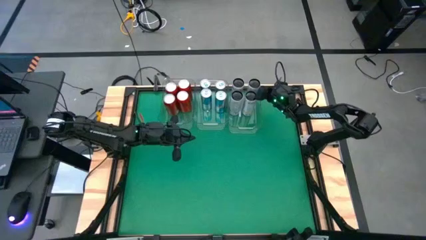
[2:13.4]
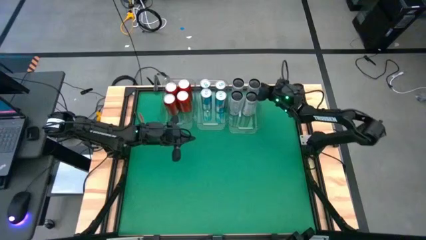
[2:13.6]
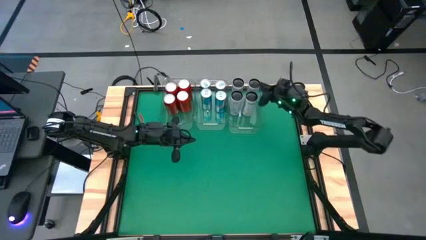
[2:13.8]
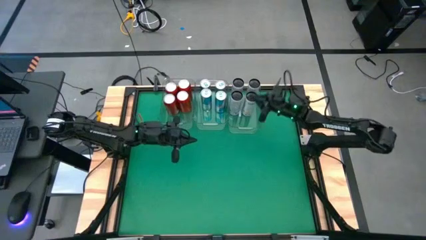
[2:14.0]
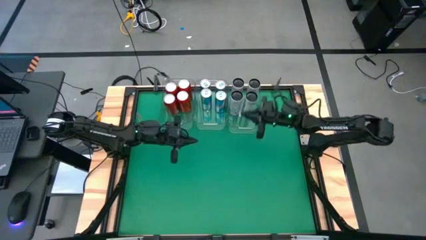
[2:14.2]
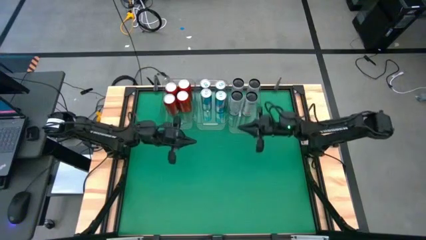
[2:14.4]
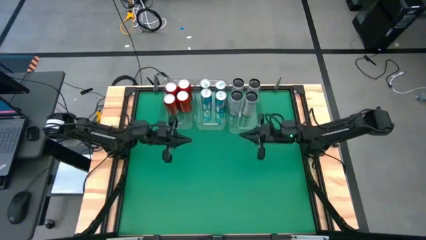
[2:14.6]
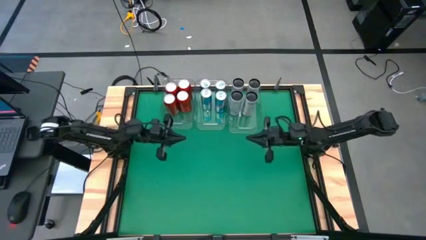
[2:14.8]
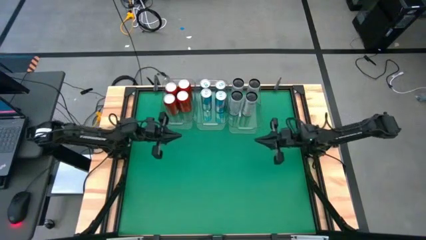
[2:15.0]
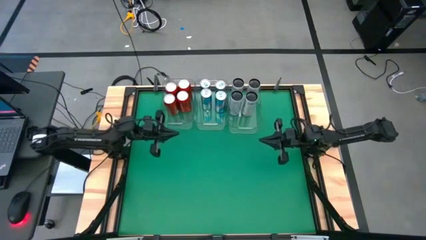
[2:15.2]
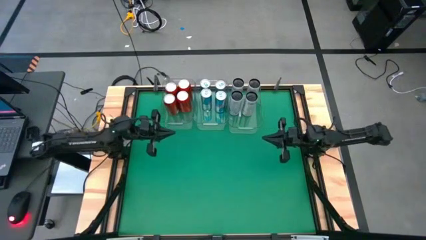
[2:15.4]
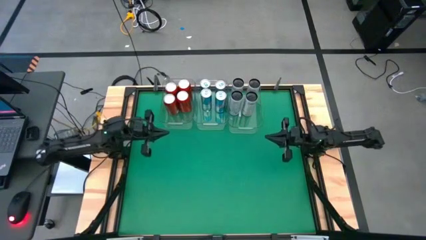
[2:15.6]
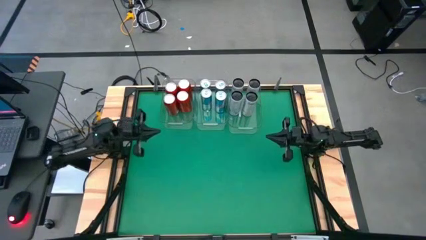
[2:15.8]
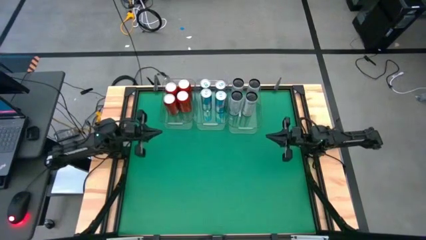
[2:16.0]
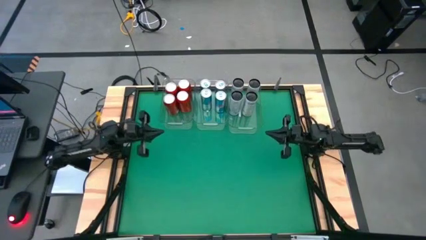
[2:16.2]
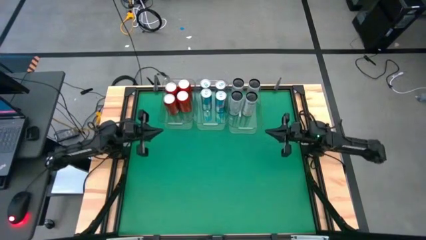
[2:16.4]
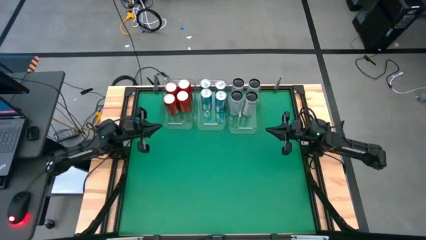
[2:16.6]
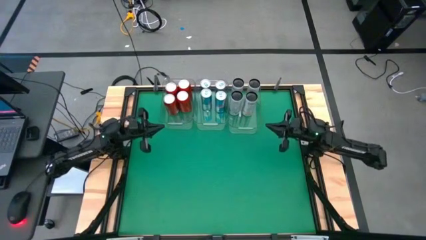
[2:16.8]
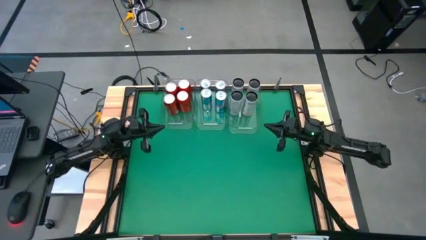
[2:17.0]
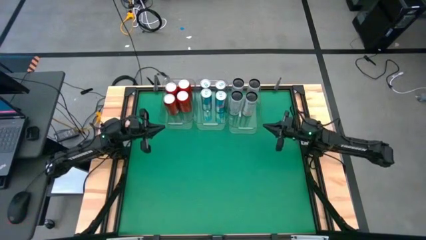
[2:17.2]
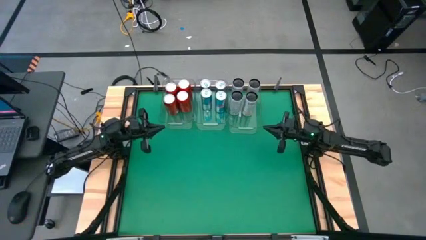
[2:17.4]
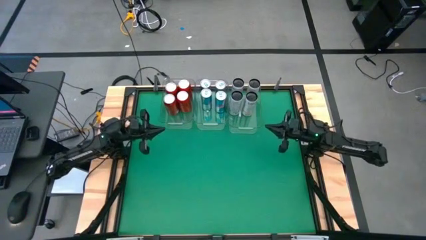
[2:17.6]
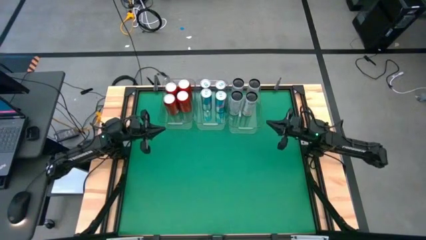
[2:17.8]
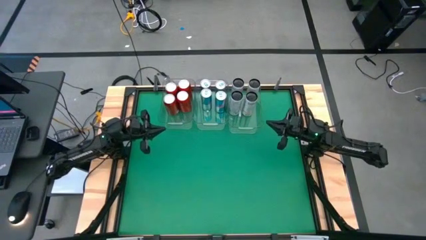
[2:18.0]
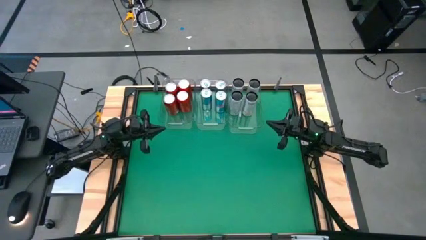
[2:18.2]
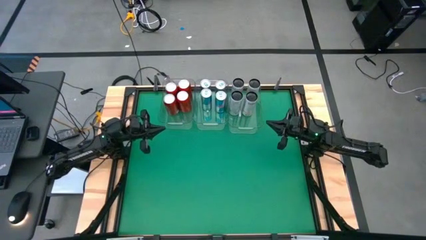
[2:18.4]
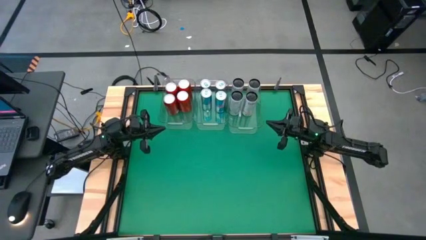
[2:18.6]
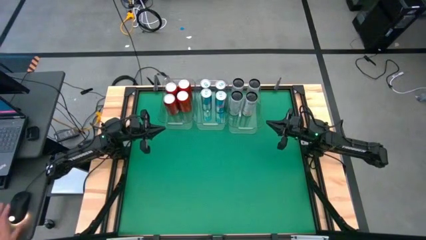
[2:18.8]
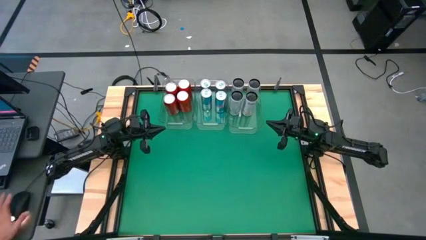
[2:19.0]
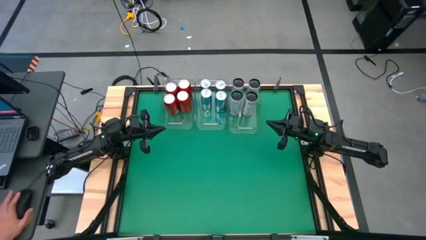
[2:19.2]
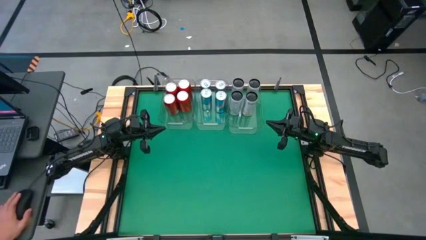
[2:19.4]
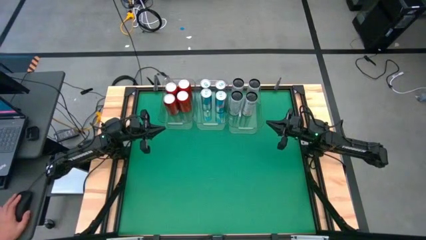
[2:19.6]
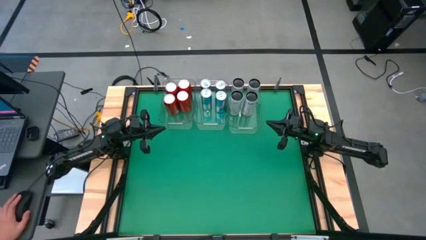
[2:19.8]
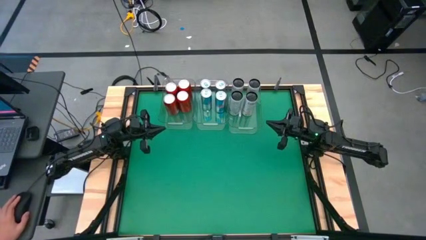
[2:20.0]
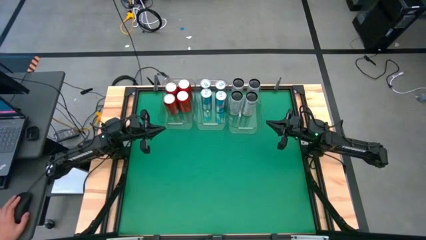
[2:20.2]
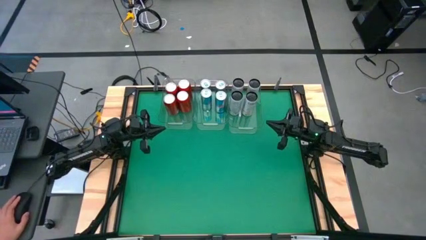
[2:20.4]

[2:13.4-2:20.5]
Task: Sort soda cans
Return to Home Position

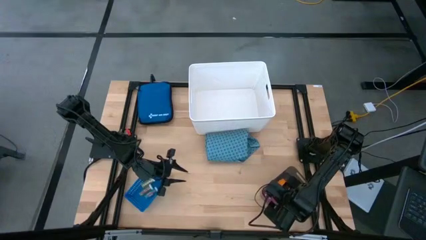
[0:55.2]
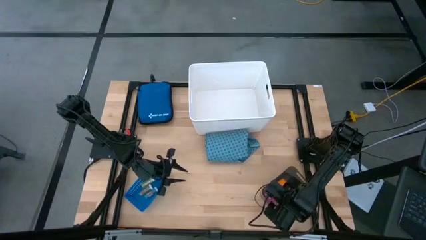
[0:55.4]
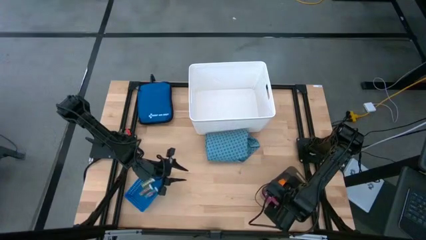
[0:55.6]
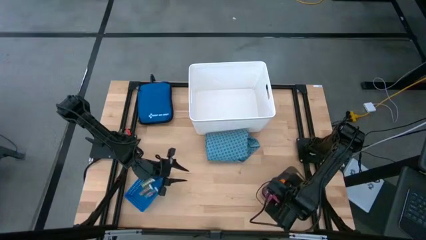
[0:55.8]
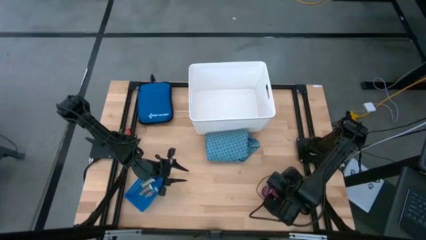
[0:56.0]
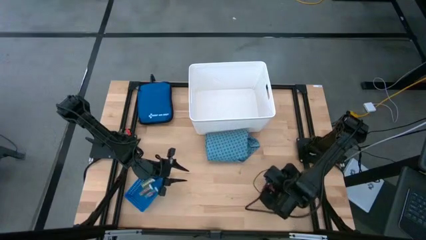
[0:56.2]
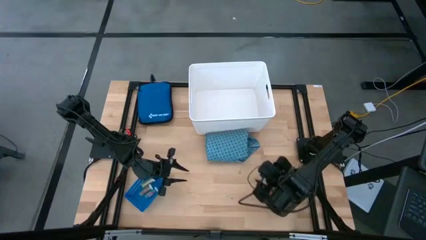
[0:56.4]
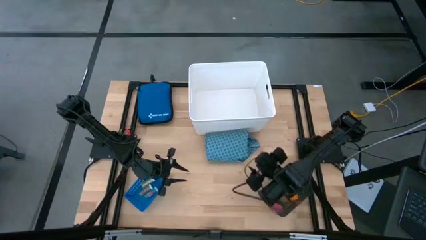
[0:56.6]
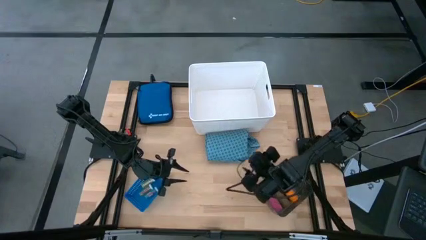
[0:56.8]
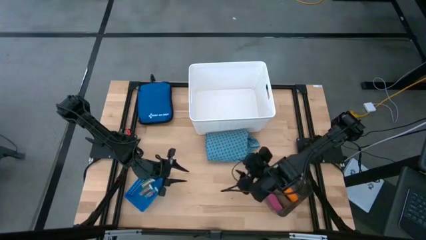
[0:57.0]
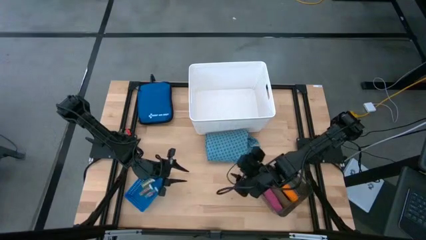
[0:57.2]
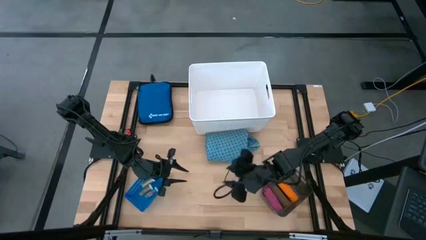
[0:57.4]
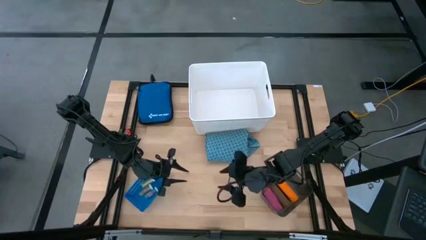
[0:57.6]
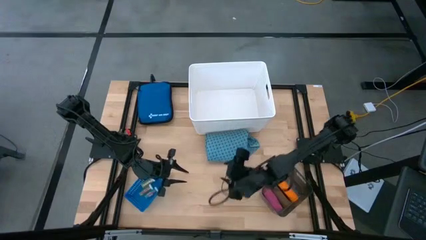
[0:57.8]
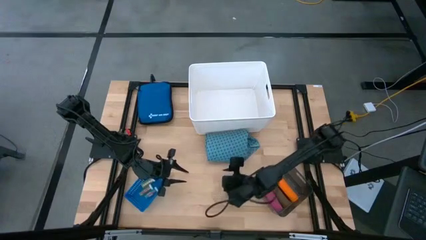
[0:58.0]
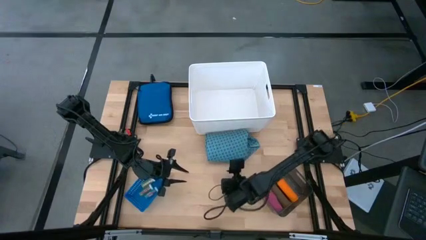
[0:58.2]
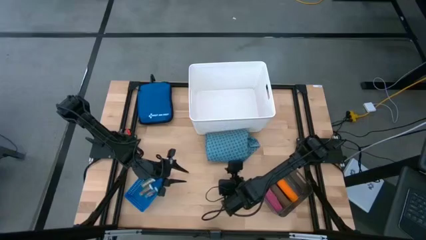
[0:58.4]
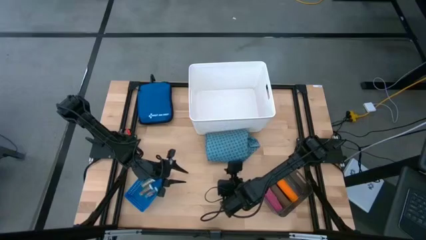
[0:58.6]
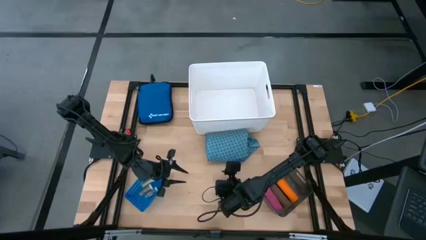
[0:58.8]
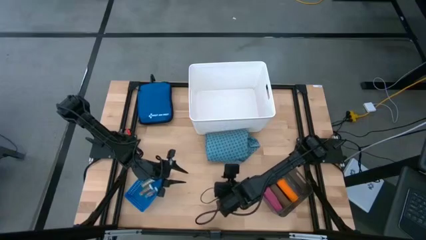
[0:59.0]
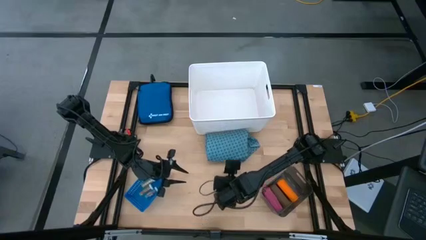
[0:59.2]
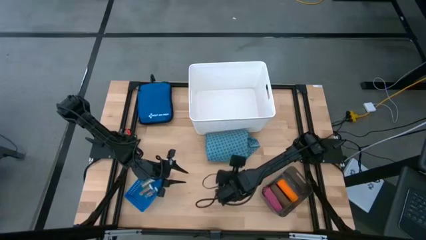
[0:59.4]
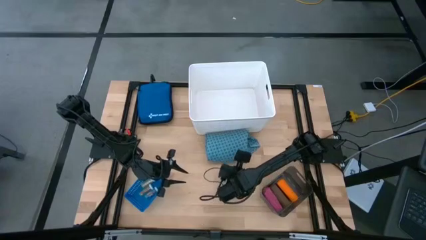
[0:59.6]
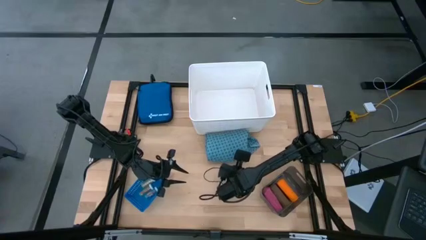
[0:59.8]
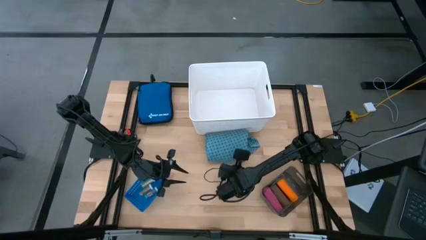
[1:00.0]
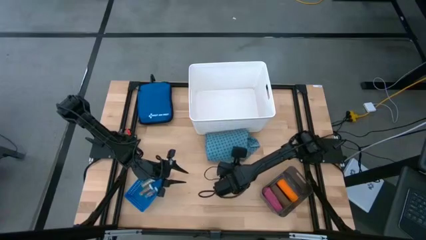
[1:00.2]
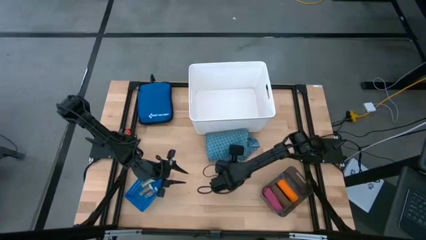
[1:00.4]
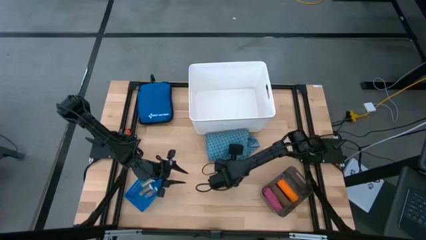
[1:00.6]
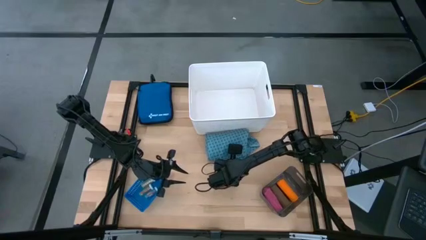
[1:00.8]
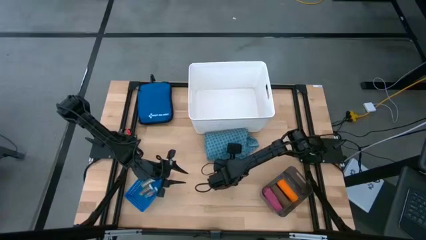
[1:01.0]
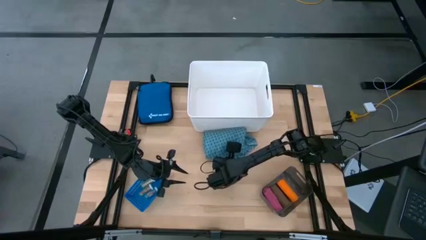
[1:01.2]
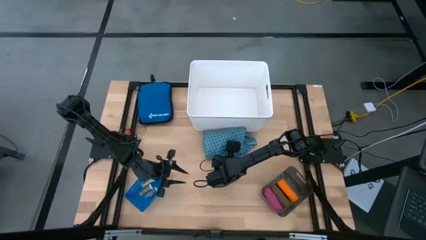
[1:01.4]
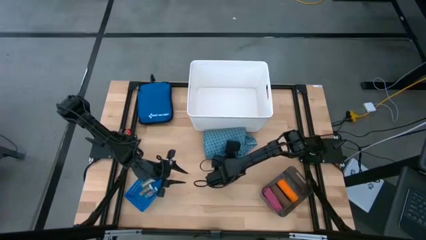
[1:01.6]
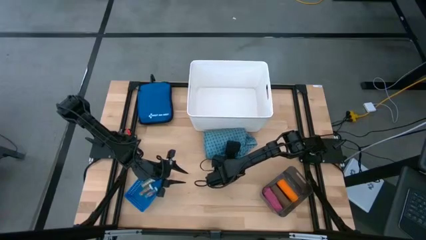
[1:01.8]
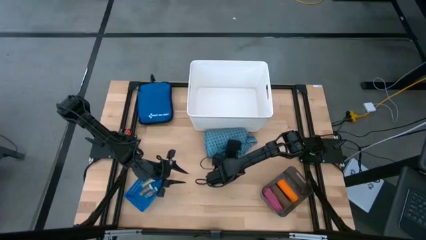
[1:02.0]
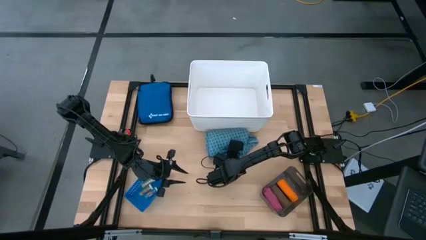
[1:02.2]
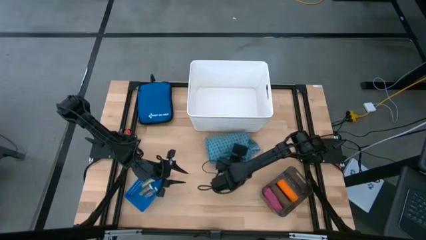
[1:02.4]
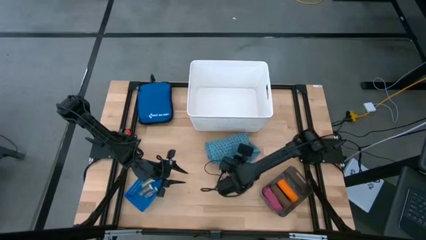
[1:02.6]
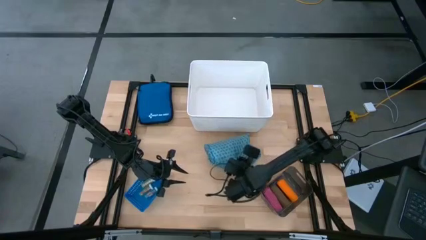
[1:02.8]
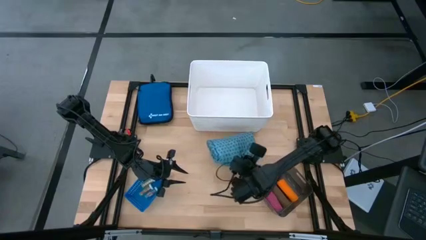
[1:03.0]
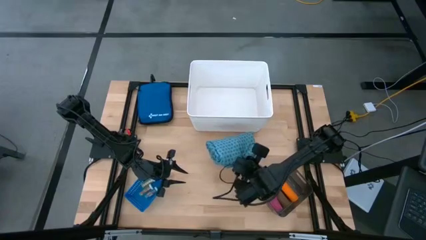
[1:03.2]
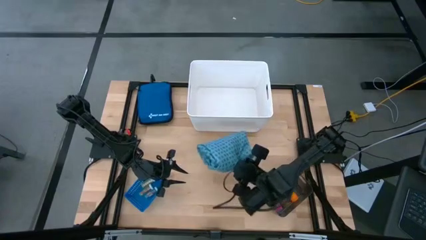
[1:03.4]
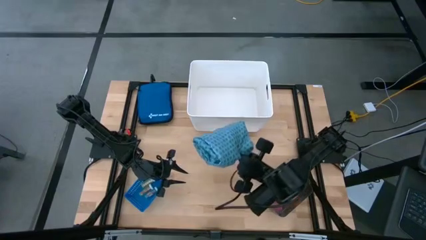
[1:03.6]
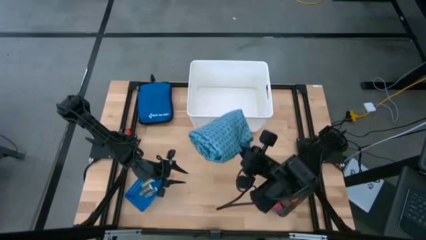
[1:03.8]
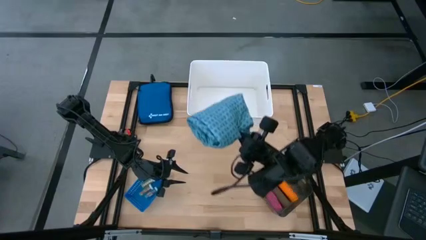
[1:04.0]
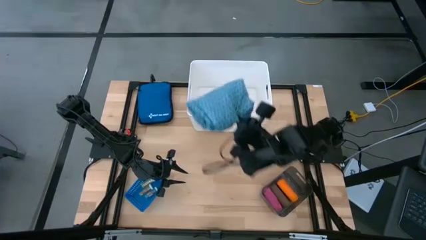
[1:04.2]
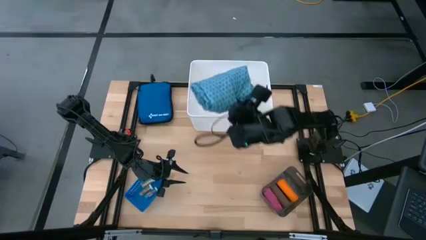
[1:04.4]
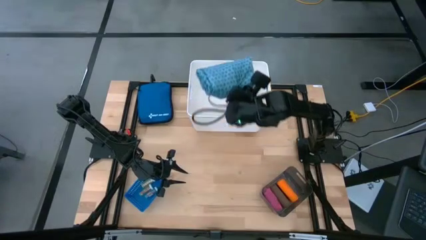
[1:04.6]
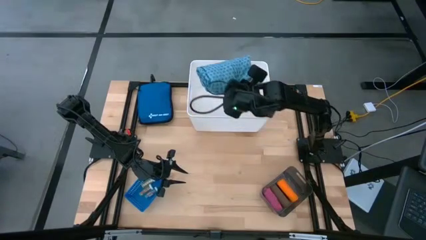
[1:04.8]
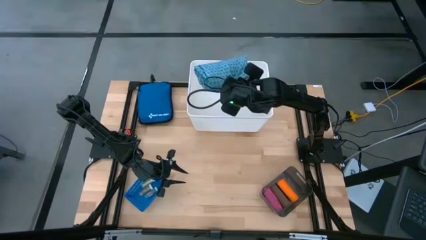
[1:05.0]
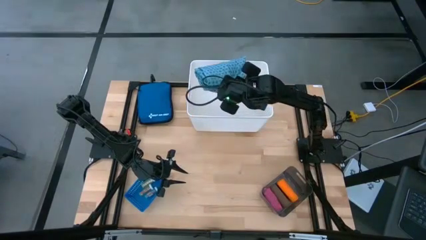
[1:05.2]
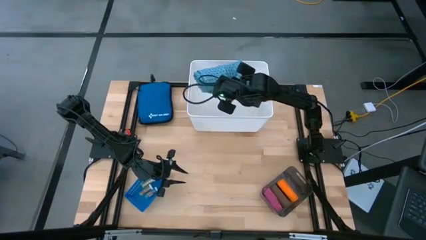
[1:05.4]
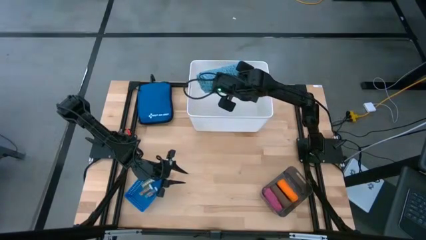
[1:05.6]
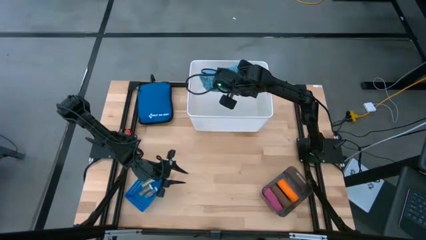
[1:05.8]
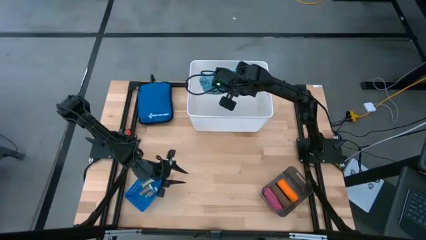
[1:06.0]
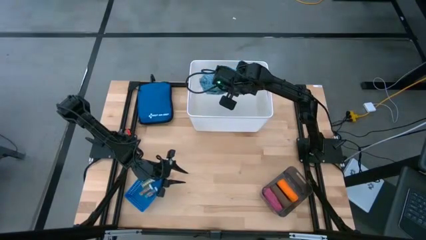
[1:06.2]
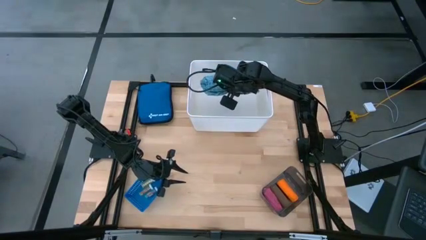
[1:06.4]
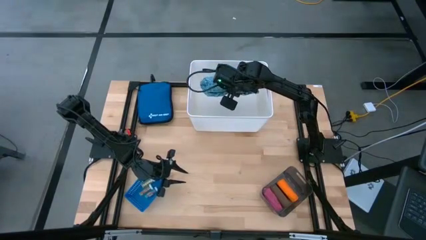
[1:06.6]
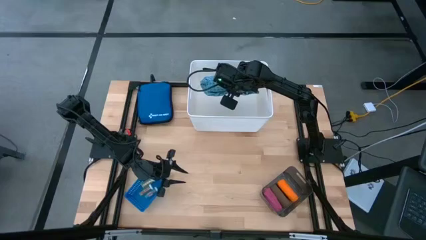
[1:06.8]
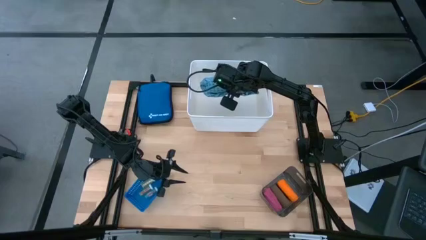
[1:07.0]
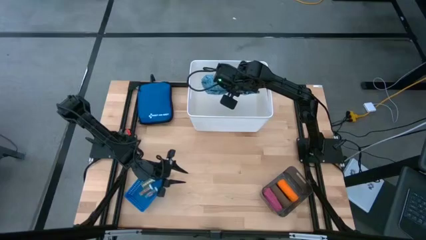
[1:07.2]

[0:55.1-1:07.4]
Task: Pick & Place Medicine items
Put the blue patient gown into the white bin
